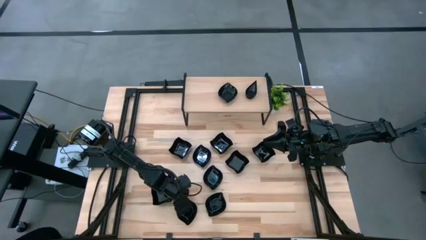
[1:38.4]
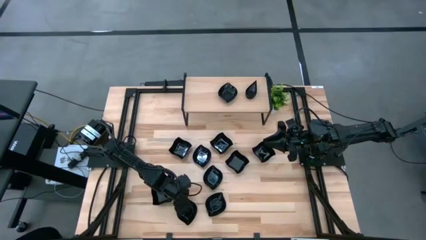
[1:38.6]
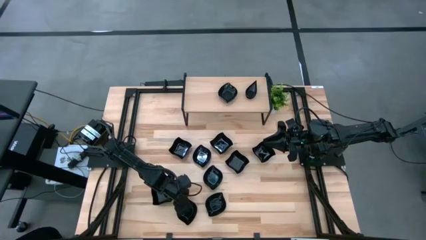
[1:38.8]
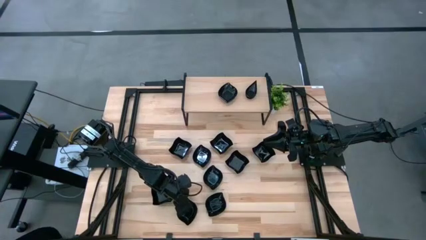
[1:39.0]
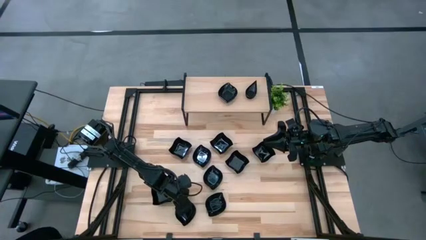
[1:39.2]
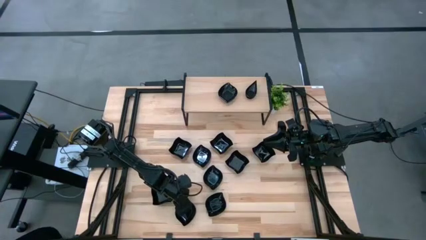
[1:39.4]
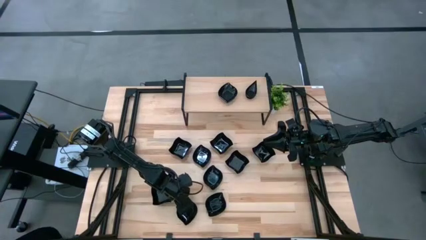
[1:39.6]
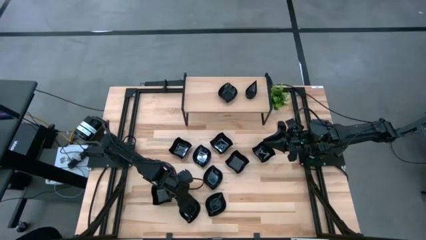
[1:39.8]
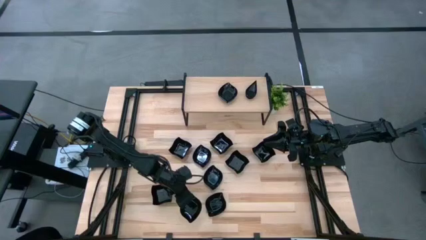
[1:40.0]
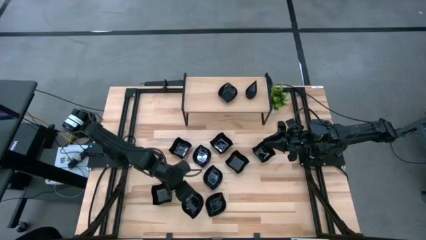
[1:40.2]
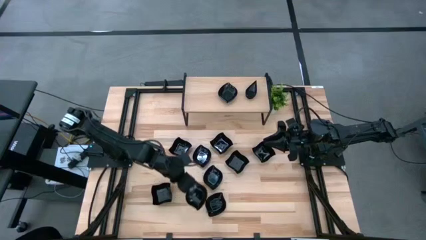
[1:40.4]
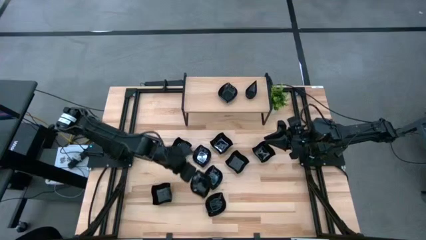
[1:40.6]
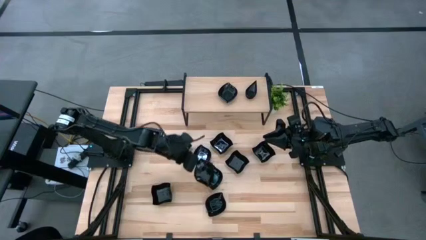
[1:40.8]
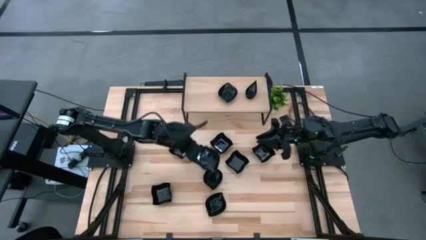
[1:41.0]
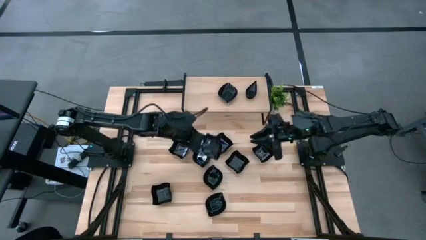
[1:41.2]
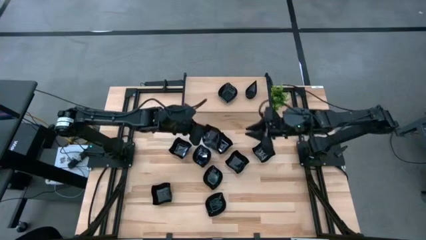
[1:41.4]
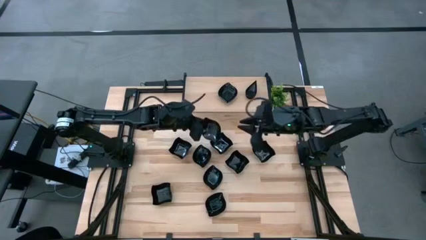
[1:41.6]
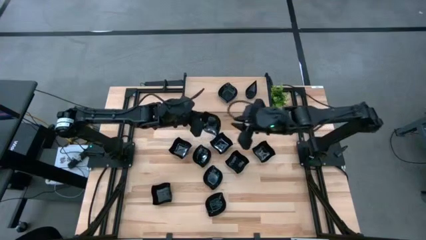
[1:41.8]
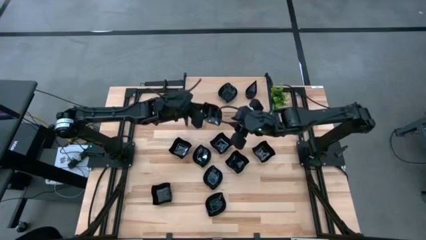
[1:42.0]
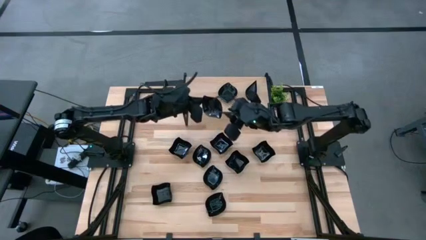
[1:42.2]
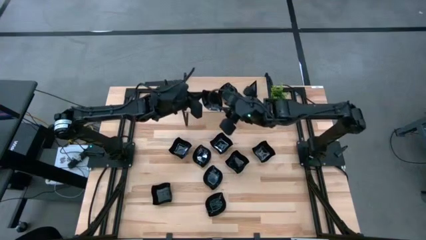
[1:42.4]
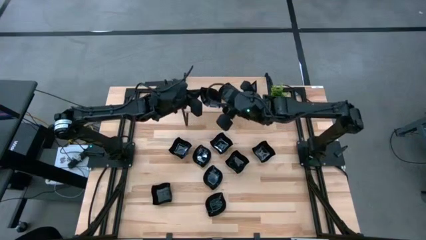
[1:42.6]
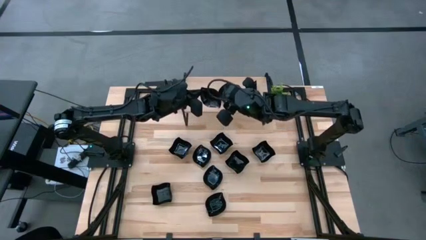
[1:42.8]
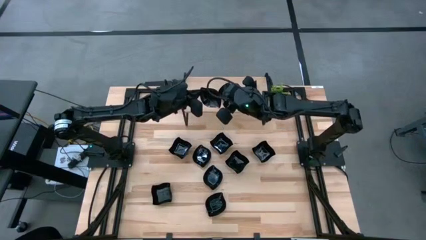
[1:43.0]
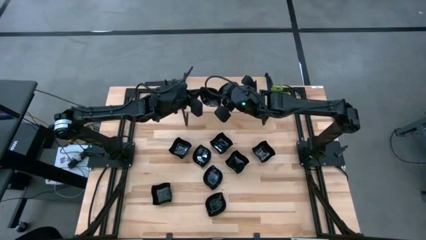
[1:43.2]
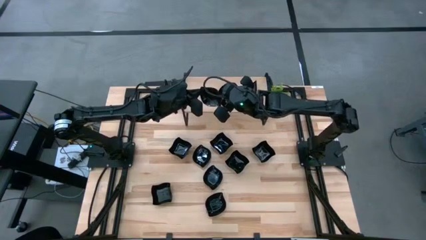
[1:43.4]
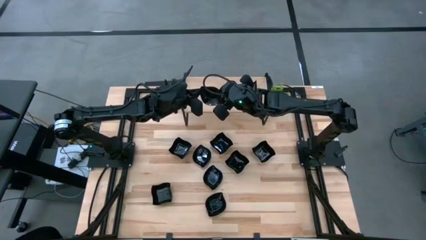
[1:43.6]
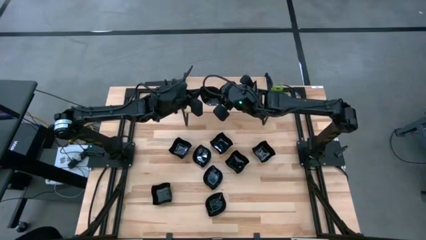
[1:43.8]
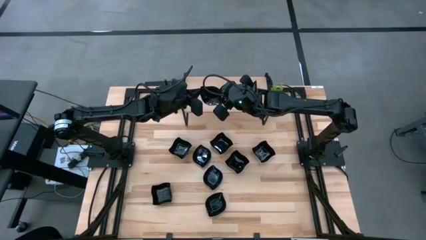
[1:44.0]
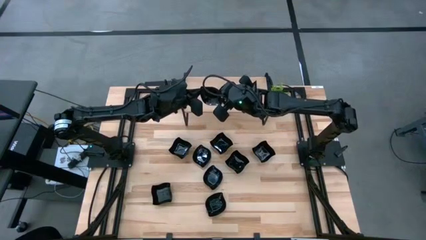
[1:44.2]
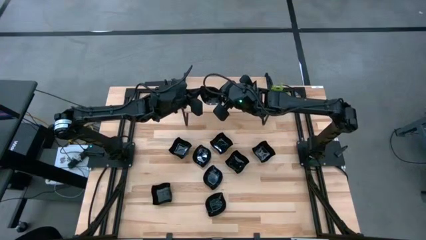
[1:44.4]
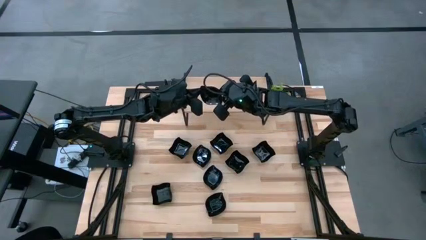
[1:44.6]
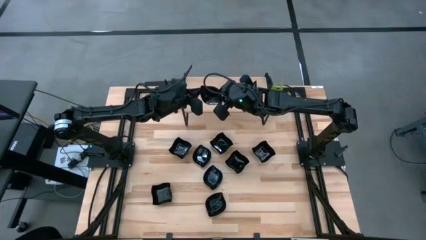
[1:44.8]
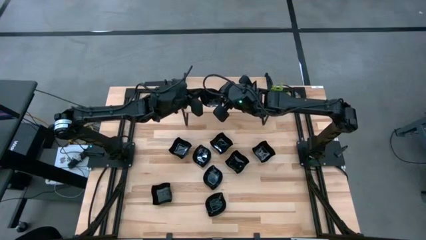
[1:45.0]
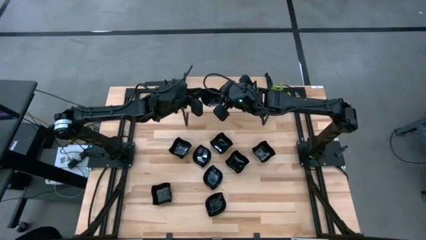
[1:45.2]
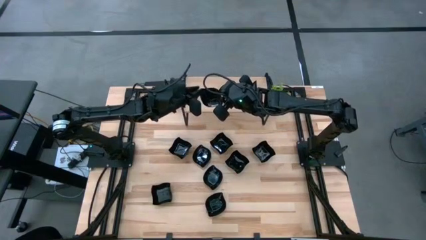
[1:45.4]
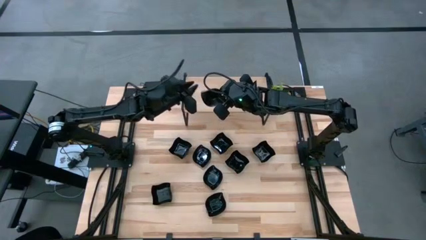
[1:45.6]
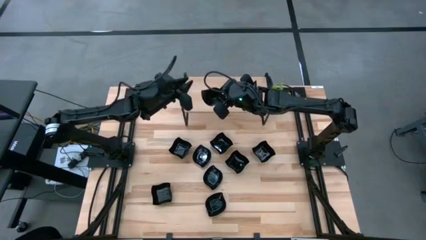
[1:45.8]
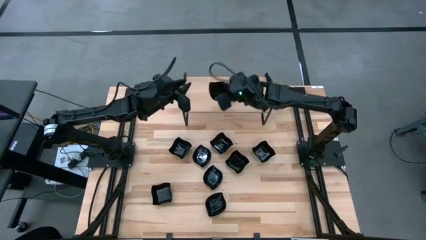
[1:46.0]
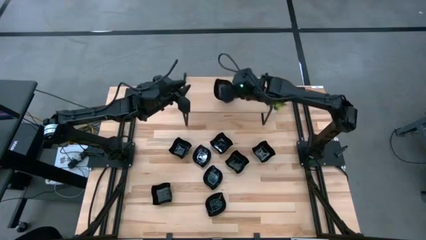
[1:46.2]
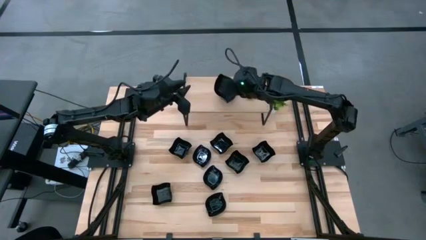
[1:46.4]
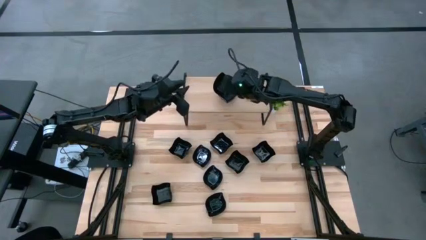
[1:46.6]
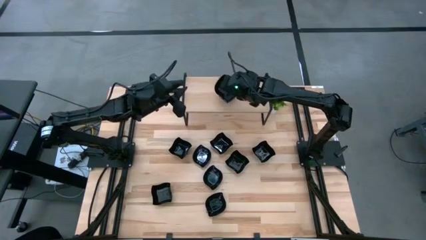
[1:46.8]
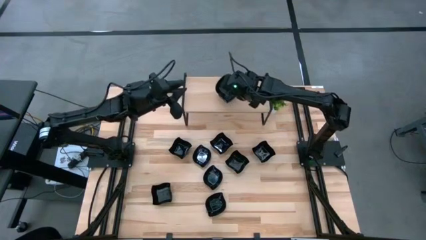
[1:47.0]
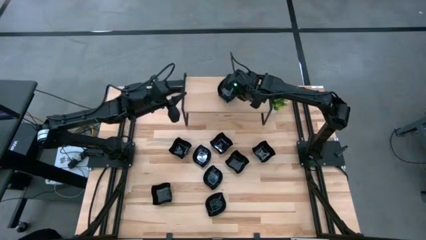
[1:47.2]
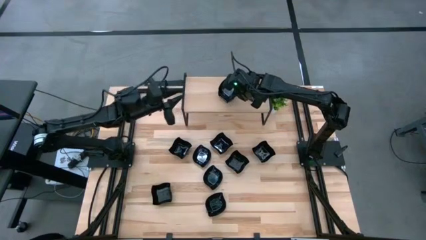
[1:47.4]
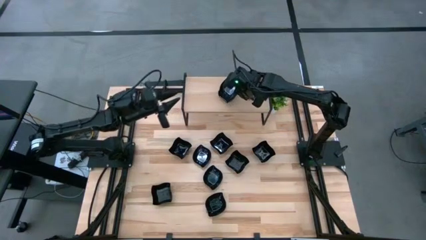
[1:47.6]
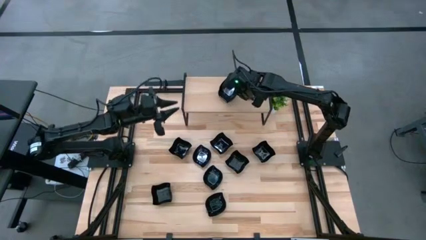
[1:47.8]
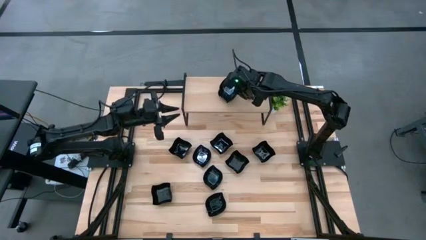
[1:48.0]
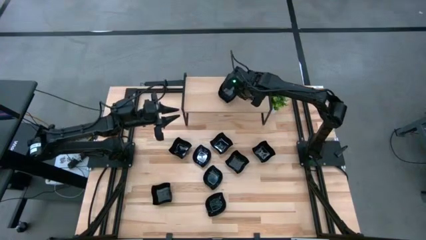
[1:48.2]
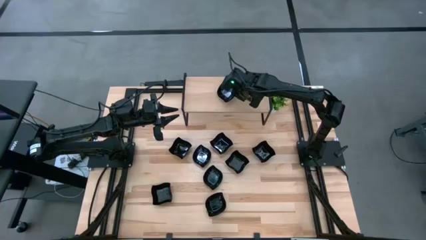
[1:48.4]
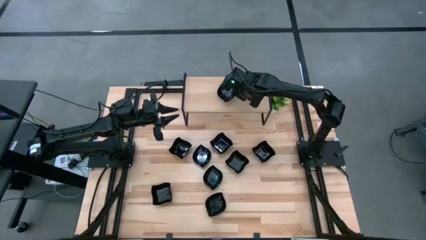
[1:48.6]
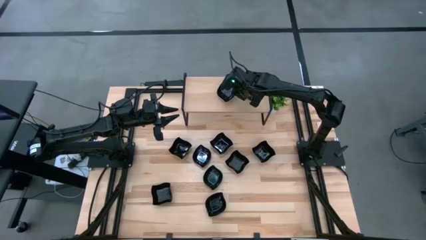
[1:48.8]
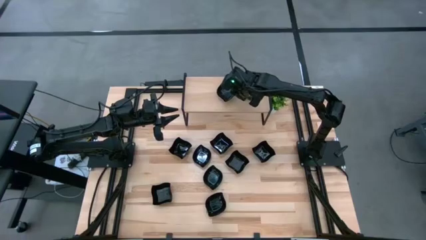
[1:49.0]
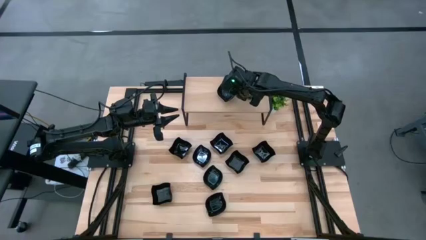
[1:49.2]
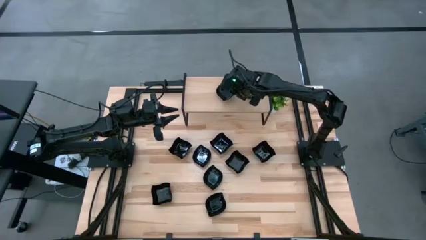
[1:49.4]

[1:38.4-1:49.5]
Task: Pick & Place Mini shaped plates
Stack the black leaf shaped plate on top of the other black leaf shaped plate on the shelf

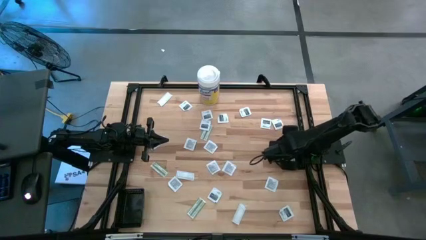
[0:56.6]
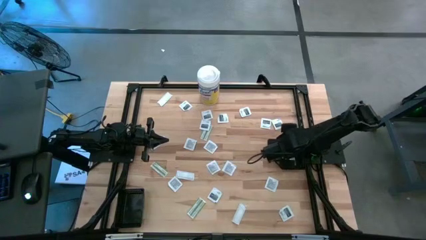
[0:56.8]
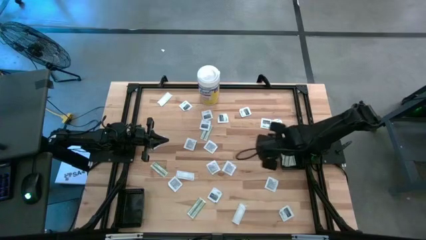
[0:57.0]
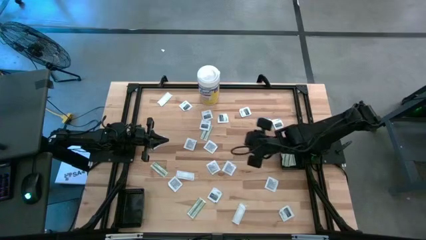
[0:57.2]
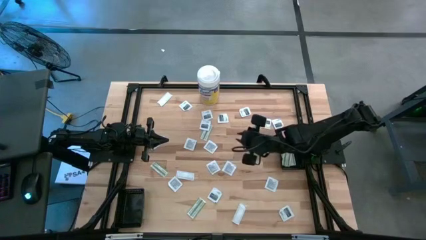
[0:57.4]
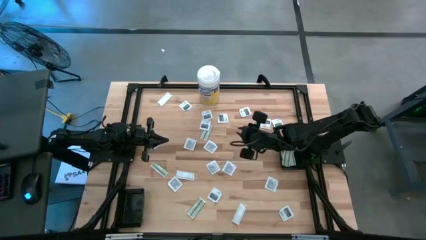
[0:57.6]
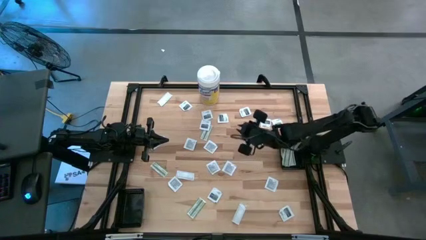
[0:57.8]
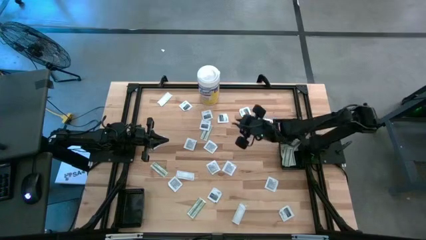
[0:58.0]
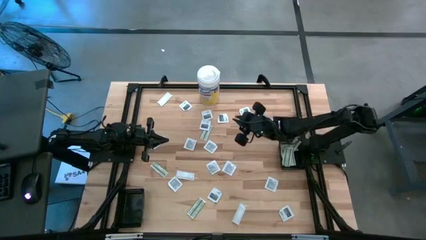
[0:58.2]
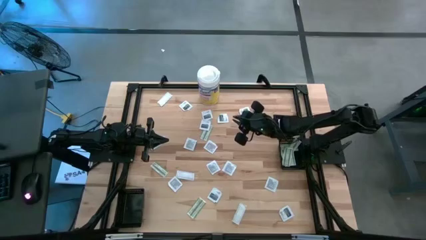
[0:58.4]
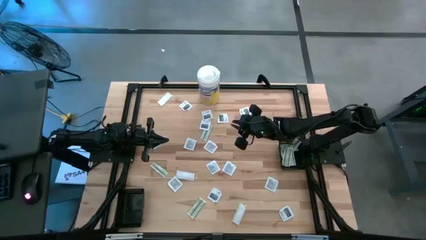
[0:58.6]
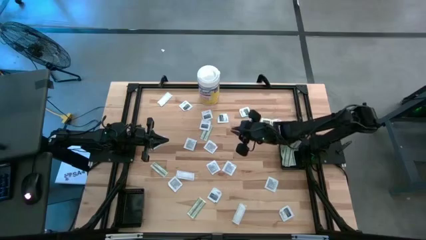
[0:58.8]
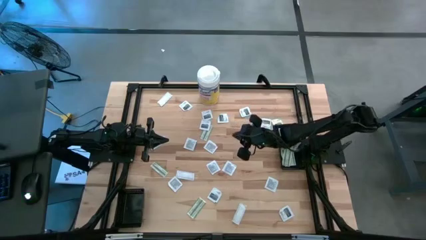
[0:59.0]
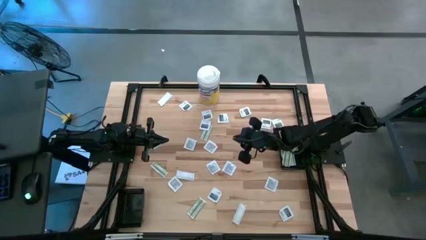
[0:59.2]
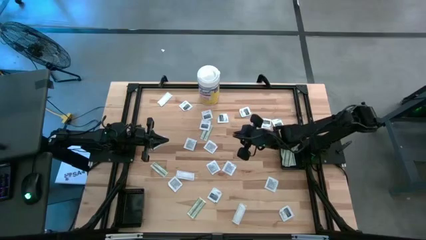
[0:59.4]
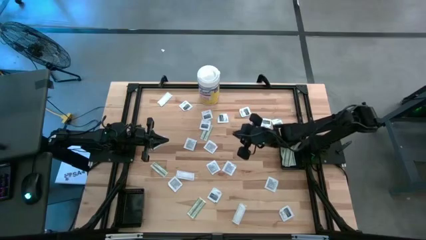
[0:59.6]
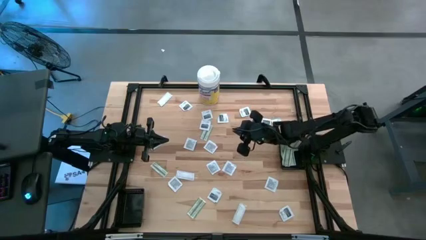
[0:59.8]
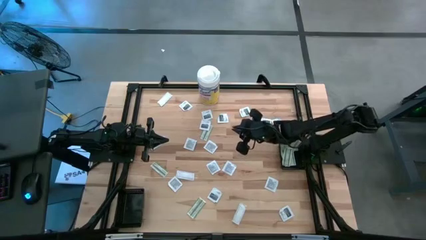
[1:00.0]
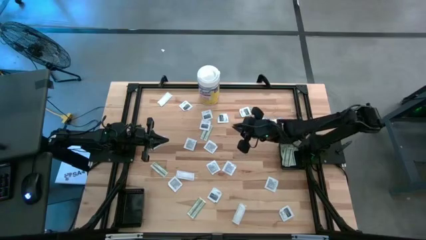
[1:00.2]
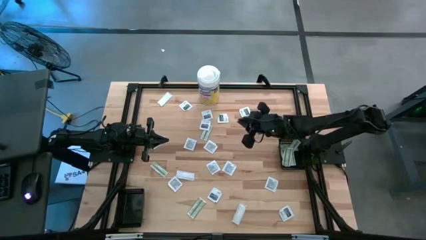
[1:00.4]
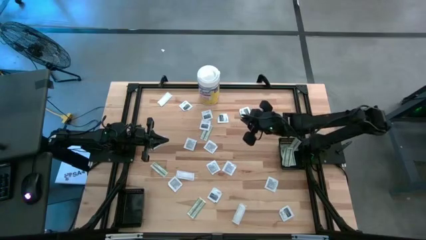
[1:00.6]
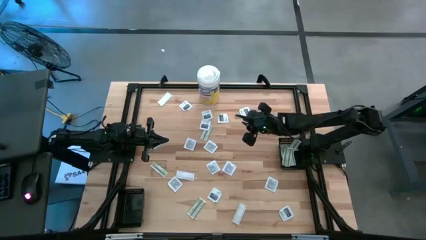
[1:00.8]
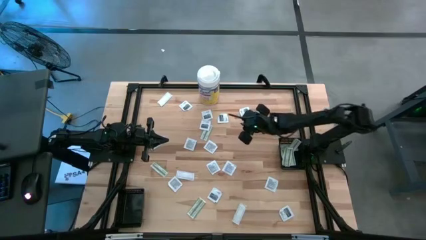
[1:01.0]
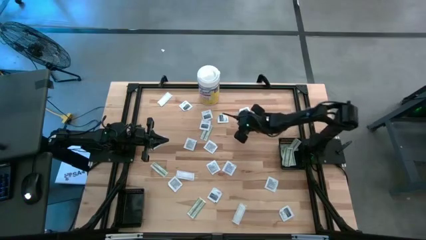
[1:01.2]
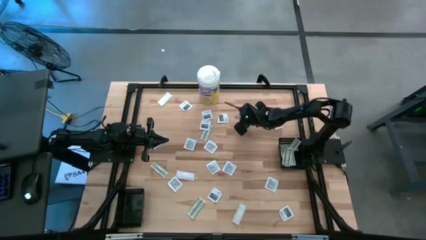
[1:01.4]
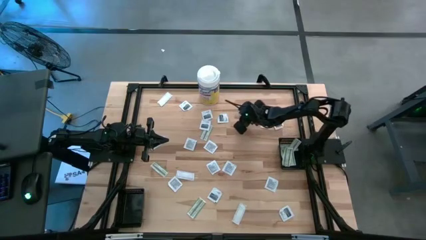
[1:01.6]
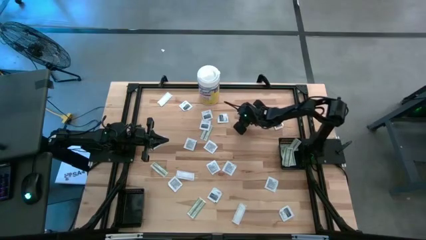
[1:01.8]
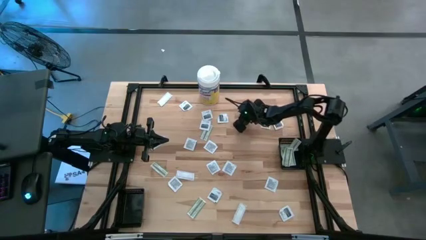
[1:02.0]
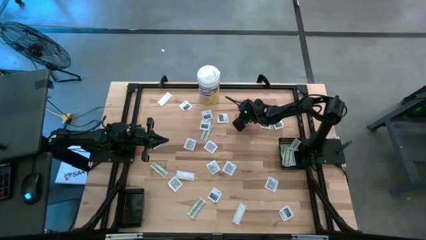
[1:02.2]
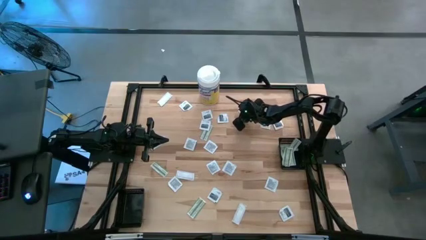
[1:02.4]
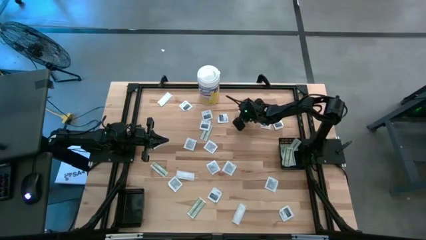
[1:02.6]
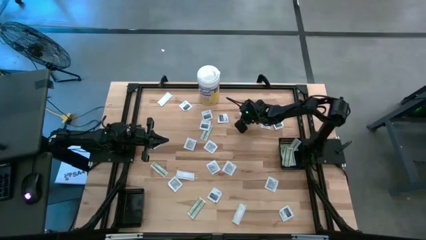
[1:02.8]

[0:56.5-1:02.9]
Task: Pick & Place First Aid Supplies
Put the white towelette sachet into the left black bin
